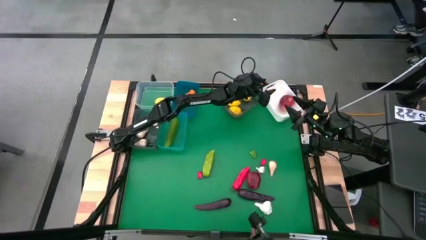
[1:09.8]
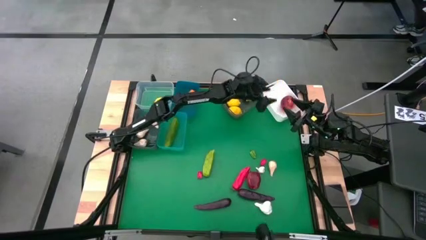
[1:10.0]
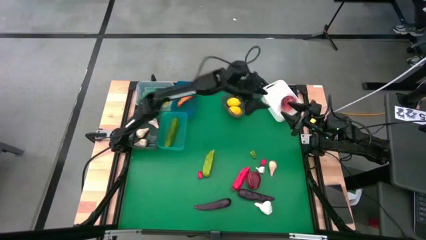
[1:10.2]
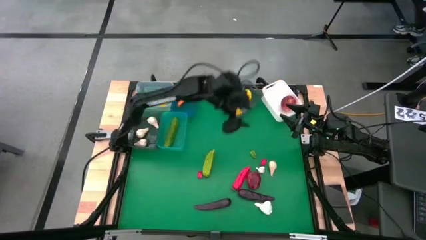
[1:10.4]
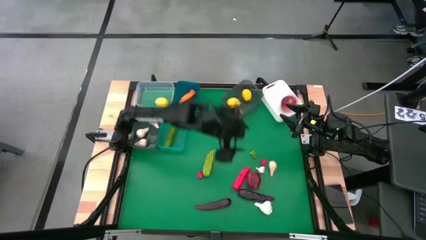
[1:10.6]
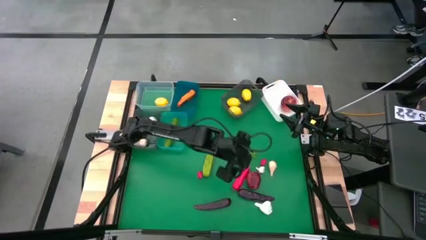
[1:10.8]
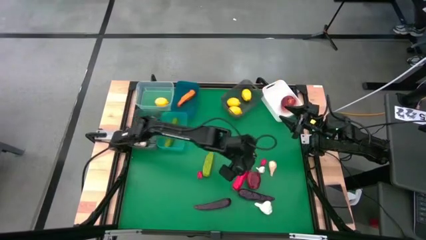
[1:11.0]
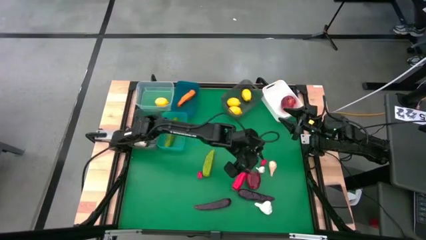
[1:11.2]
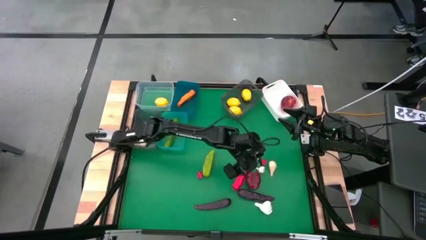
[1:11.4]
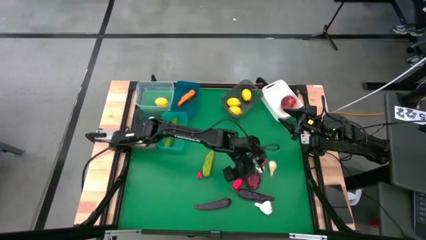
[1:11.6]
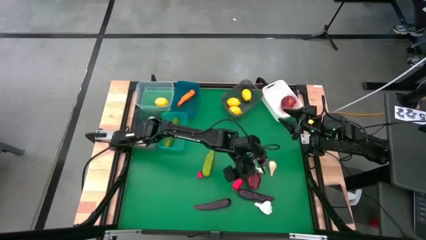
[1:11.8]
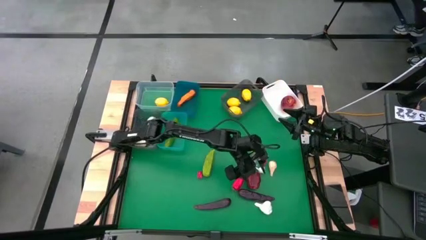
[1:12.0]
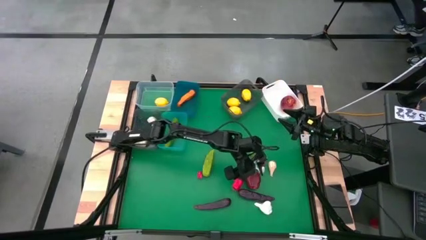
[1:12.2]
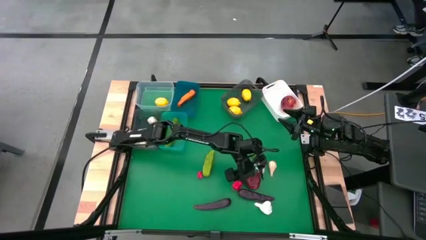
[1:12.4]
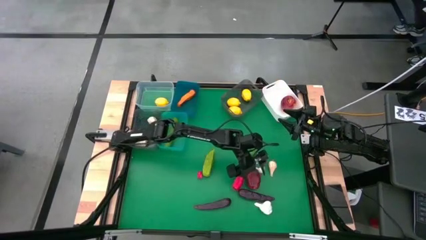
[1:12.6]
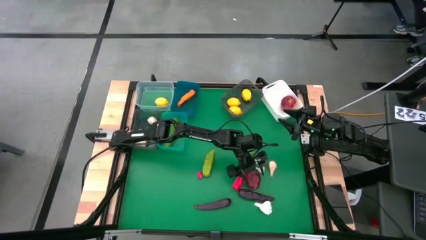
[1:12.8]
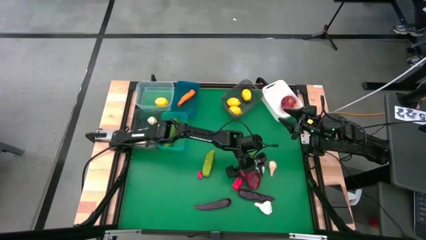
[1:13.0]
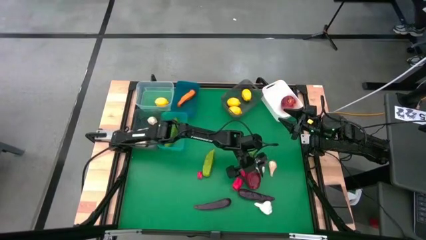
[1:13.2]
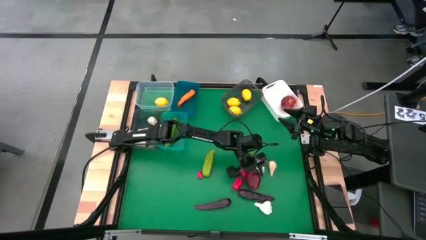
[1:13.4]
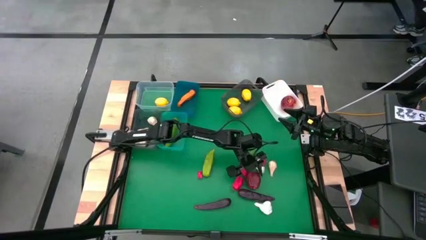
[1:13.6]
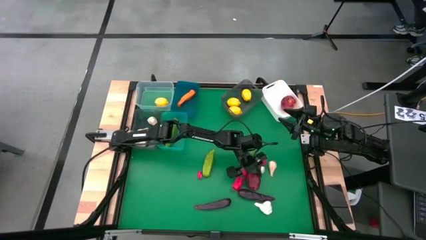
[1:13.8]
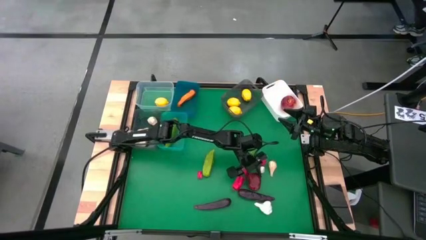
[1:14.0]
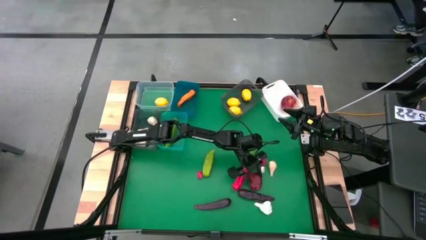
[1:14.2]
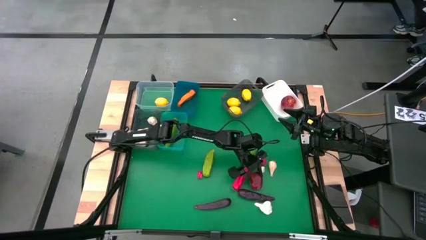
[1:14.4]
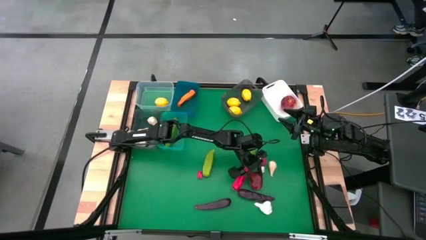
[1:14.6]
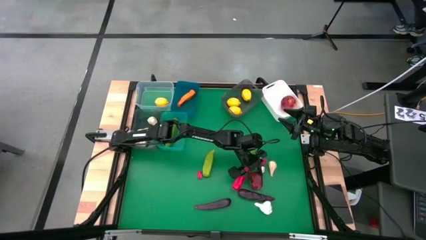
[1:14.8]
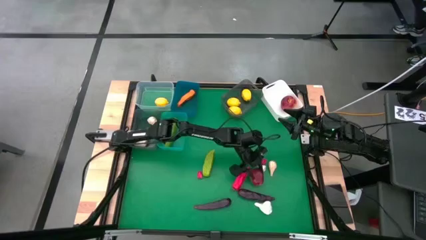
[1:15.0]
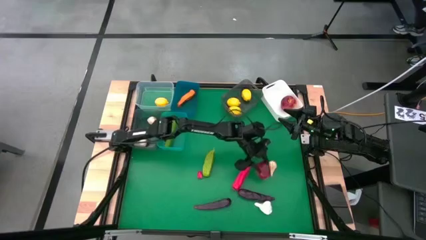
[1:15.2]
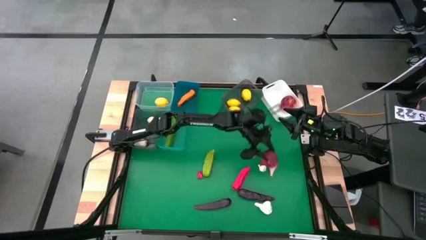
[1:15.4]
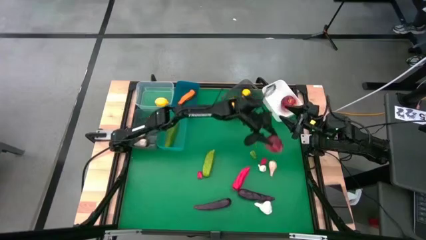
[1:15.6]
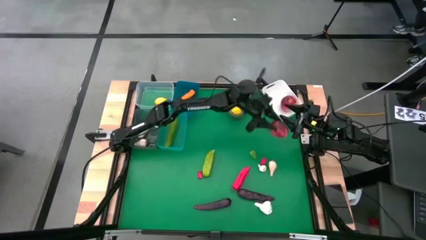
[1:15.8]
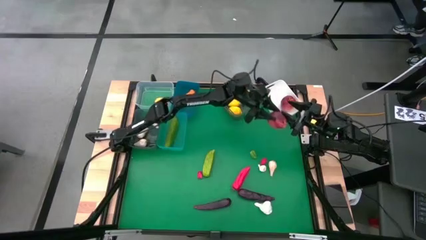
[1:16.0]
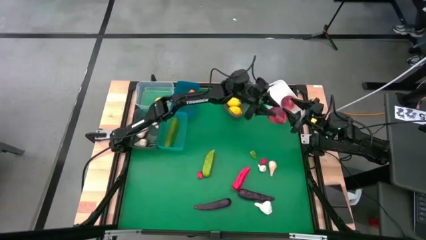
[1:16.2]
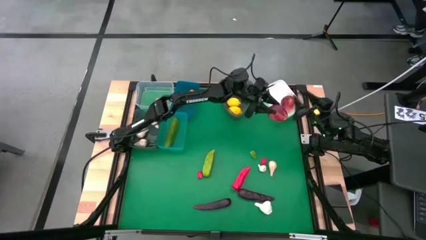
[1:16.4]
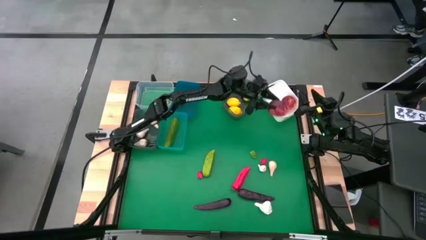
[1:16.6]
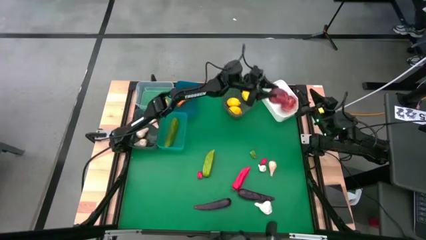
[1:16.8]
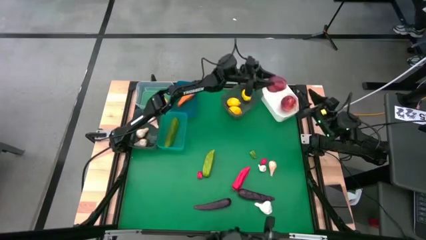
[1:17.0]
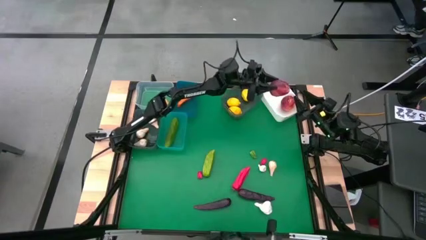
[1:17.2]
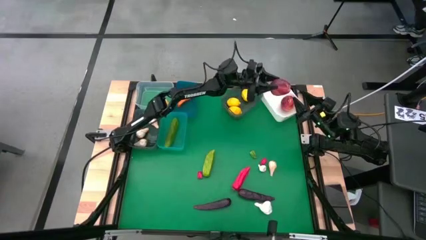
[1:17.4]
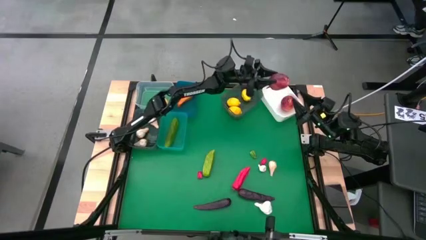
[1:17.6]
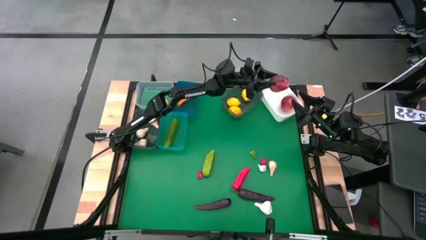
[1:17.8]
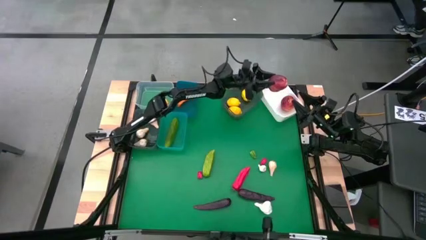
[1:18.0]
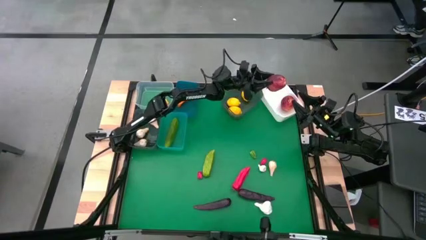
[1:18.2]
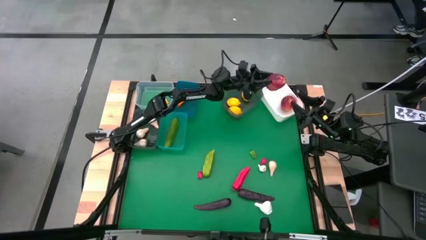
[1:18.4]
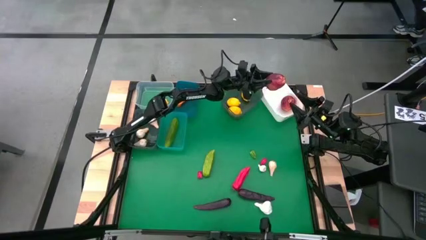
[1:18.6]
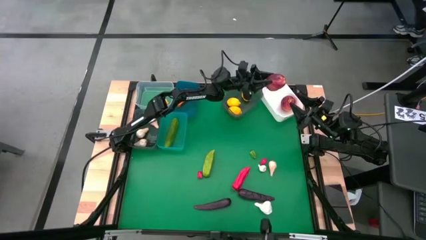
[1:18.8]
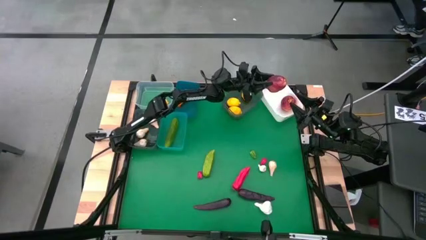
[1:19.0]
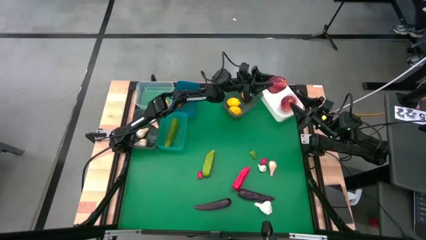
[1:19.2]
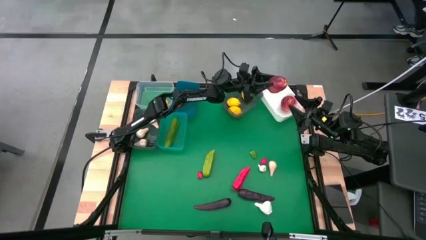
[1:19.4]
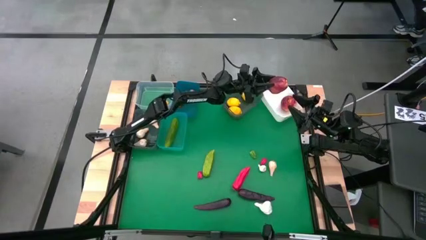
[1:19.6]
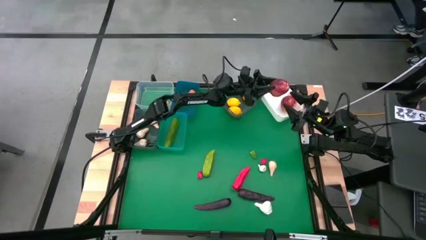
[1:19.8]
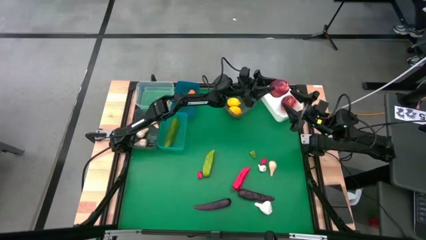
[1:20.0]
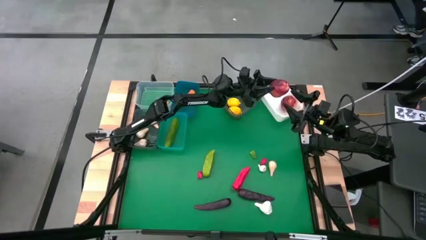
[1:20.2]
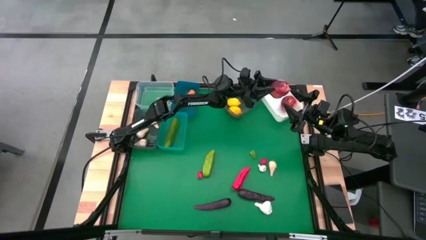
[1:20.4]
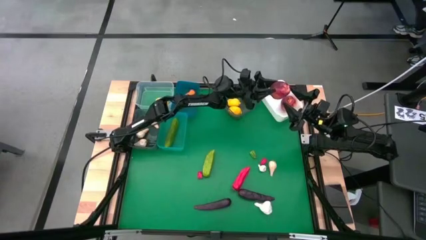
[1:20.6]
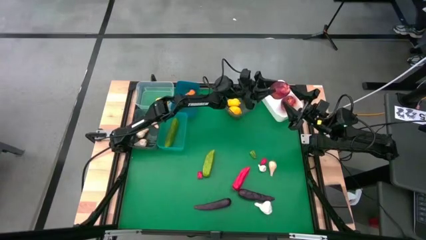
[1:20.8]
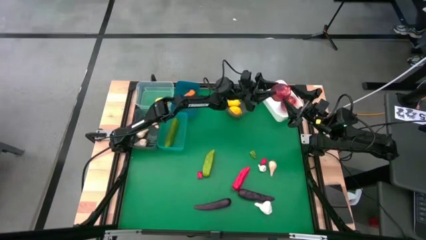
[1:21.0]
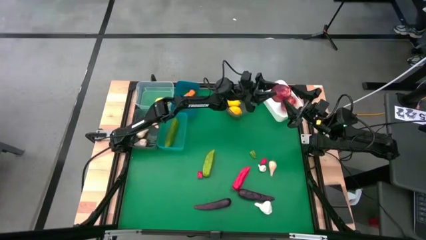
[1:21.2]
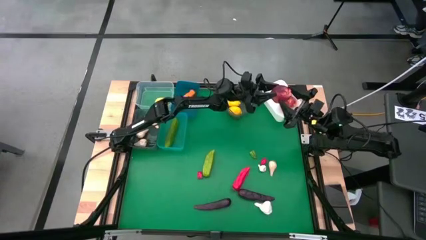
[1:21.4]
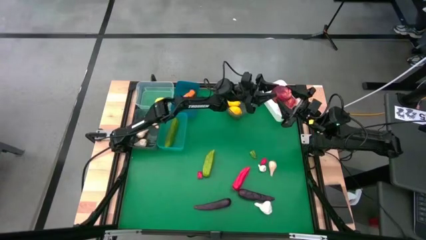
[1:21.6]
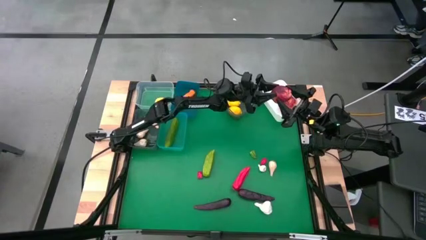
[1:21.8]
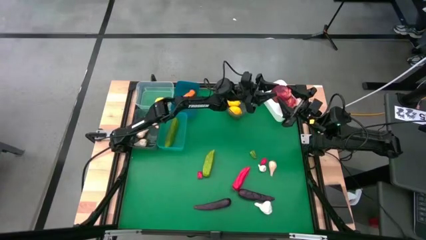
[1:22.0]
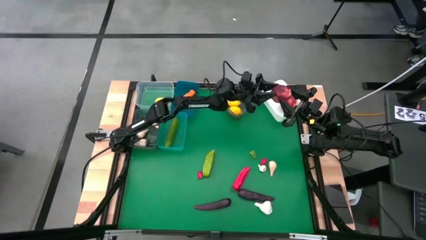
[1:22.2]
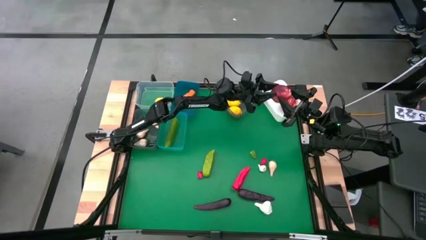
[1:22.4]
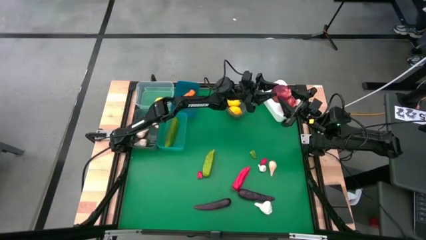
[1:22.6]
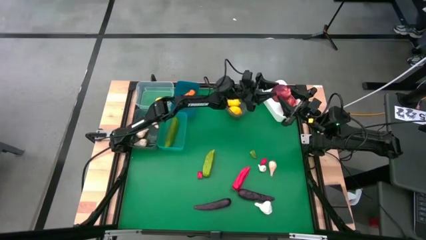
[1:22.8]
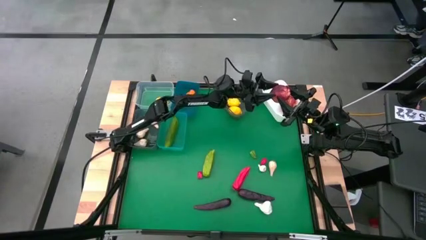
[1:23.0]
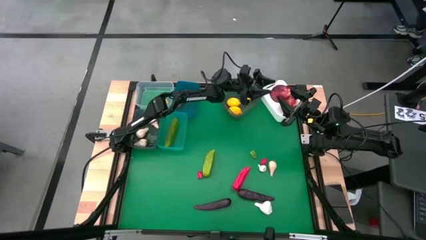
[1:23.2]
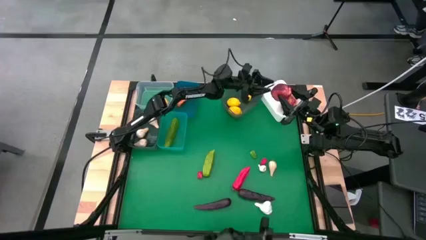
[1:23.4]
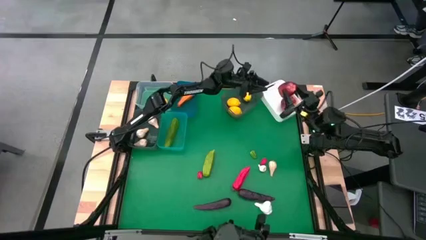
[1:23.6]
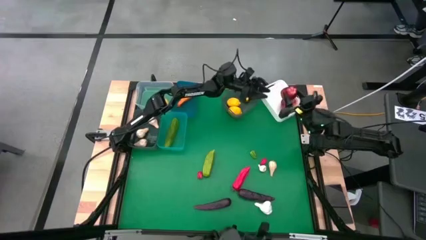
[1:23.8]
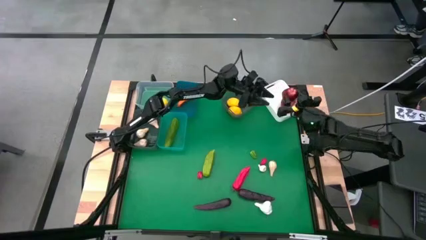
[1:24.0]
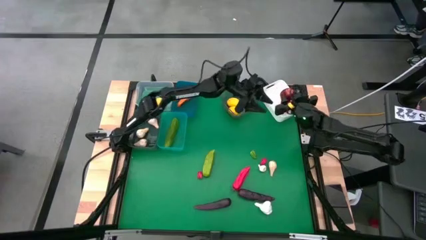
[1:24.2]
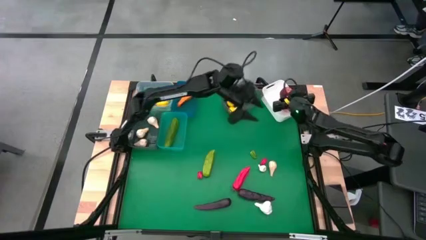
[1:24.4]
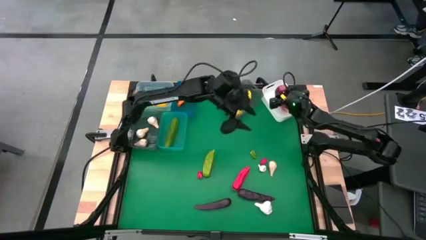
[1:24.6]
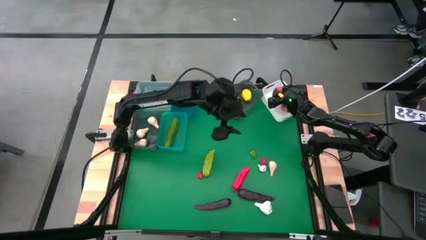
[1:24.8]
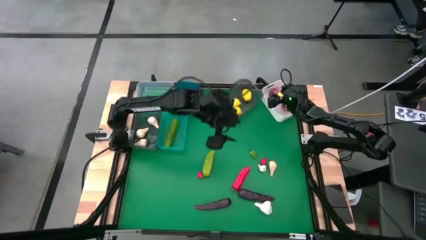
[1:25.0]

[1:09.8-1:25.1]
Task: Sort produce into baskets
Put the red apple into the white bin

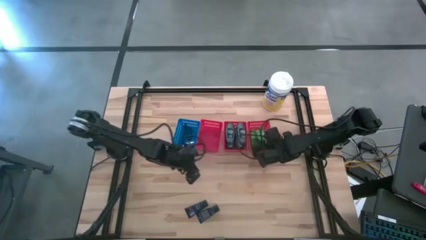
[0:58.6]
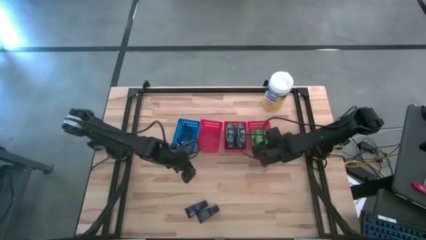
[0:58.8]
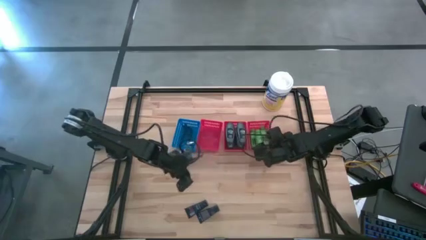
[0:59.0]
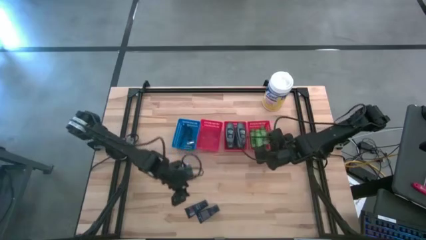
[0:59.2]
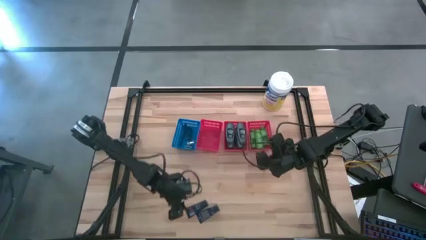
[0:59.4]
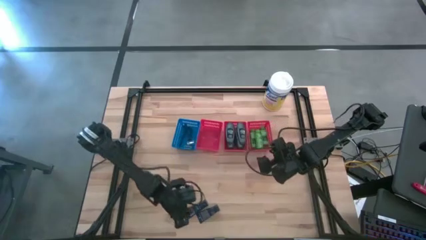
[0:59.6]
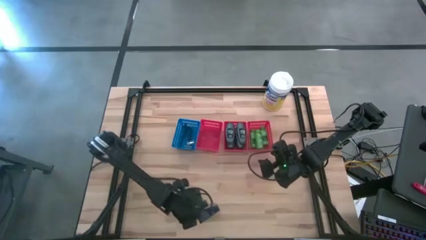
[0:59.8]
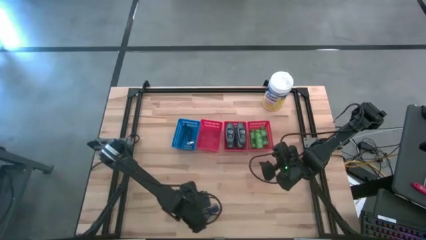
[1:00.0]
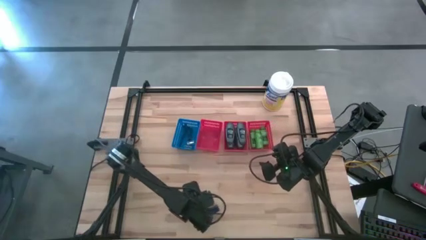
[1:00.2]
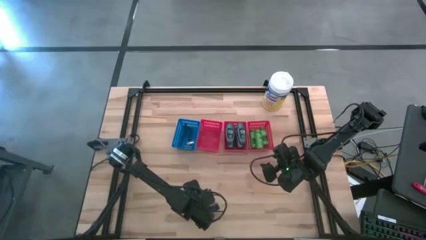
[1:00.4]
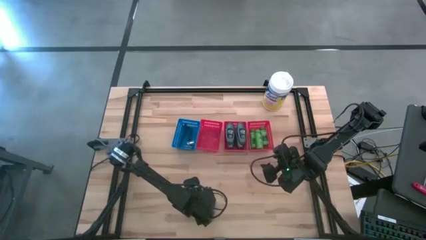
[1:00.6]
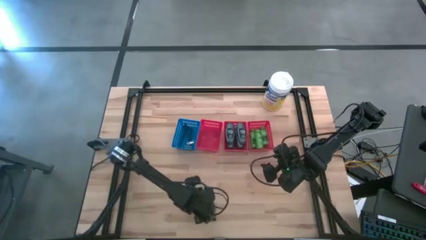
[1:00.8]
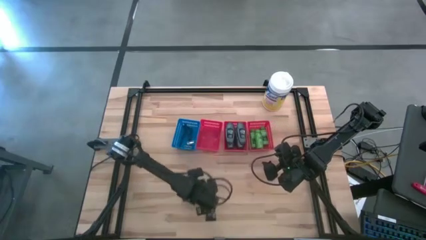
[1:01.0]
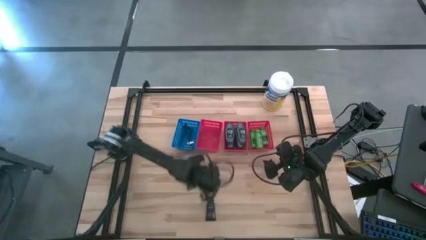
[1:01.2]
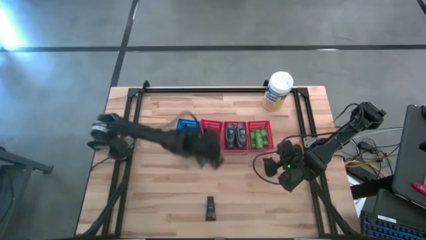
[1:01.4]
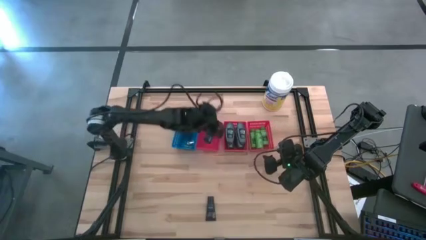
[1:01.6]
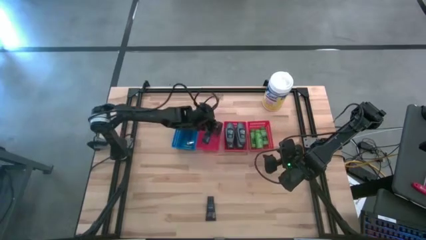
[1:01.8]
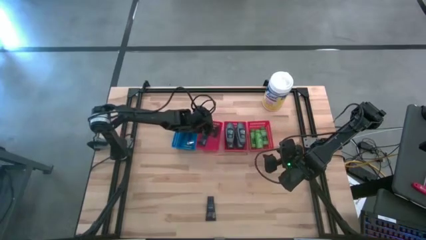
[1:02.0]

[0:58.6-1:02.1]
Task: Pick & Place Travel size toiletries
Put the blue shave cream into the left red bin
